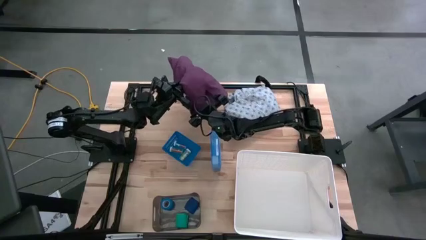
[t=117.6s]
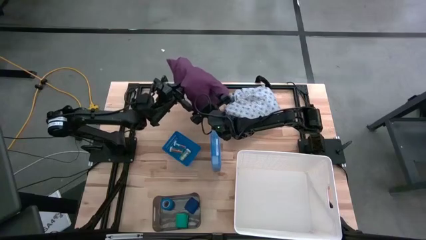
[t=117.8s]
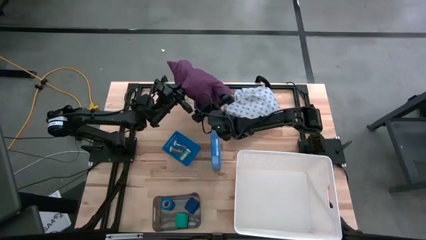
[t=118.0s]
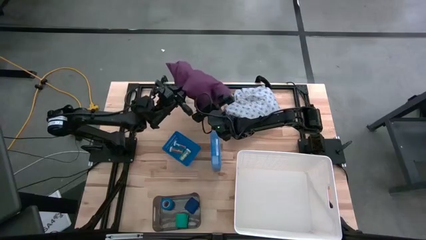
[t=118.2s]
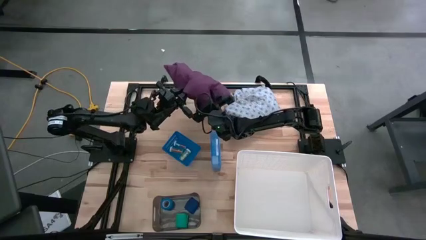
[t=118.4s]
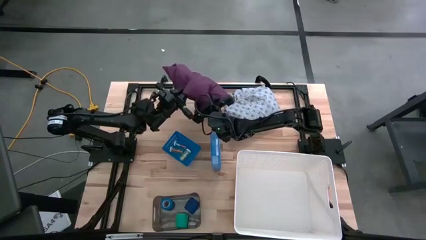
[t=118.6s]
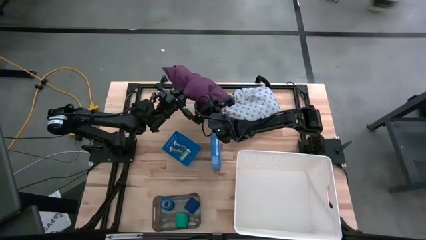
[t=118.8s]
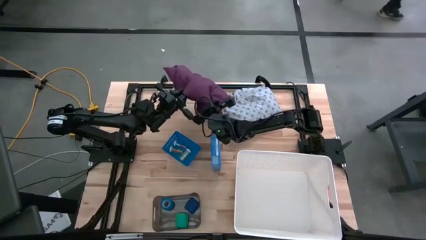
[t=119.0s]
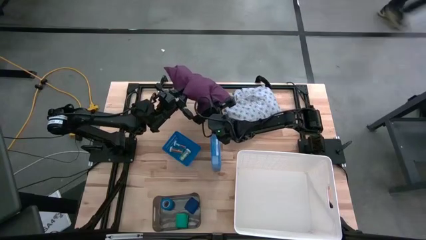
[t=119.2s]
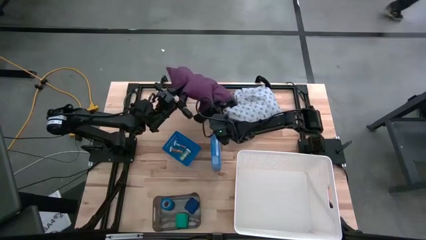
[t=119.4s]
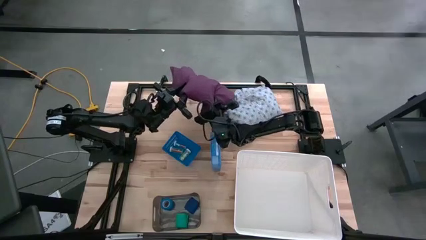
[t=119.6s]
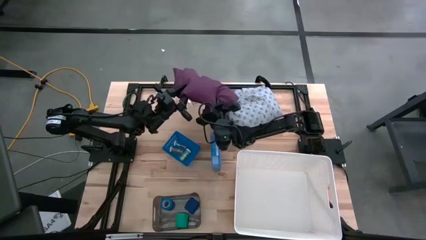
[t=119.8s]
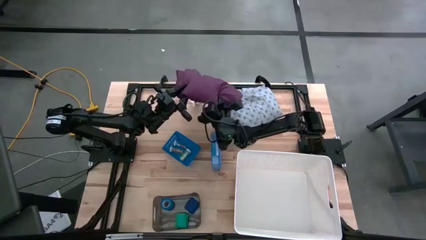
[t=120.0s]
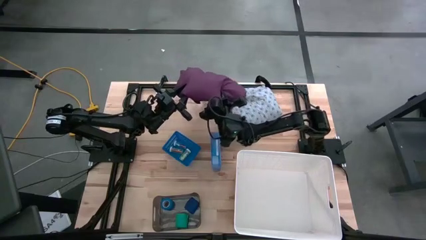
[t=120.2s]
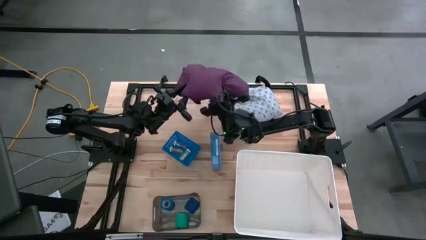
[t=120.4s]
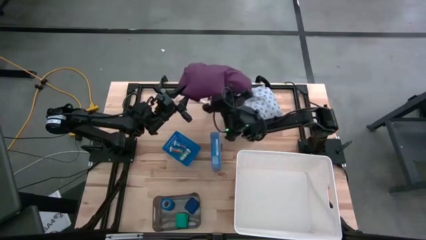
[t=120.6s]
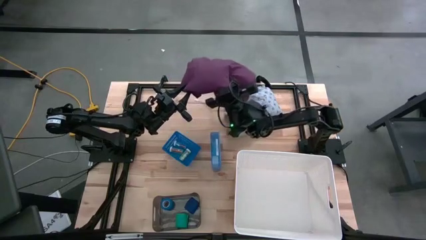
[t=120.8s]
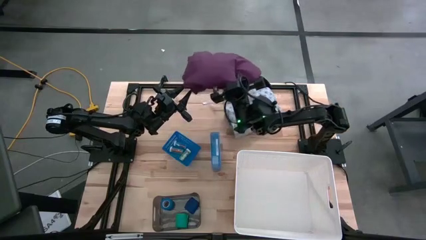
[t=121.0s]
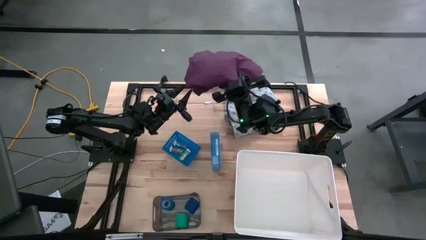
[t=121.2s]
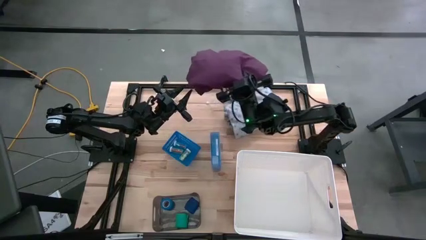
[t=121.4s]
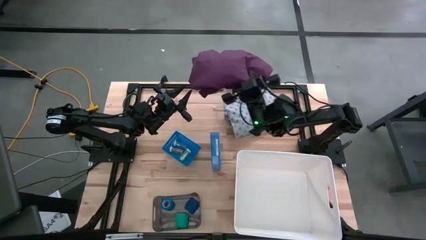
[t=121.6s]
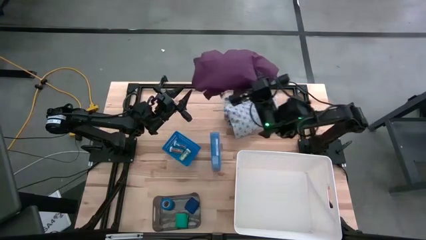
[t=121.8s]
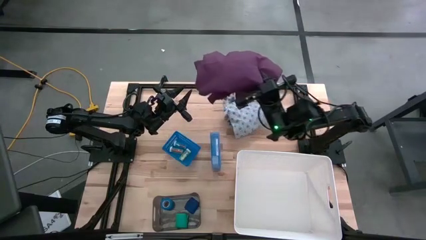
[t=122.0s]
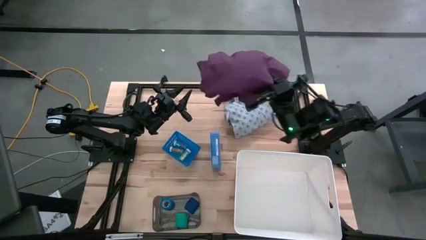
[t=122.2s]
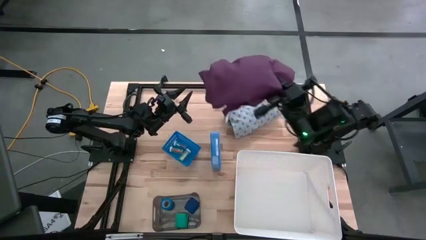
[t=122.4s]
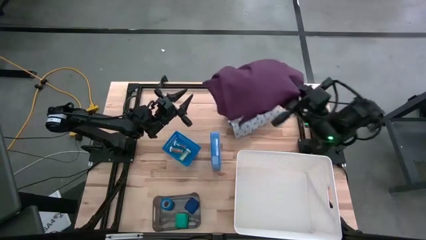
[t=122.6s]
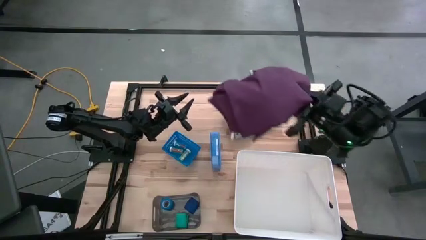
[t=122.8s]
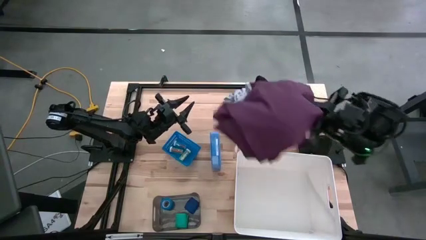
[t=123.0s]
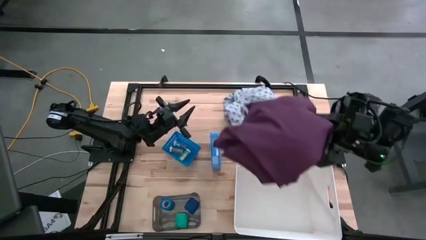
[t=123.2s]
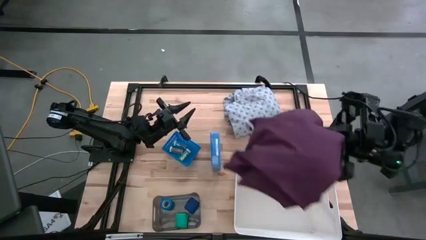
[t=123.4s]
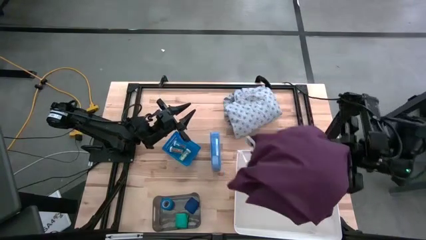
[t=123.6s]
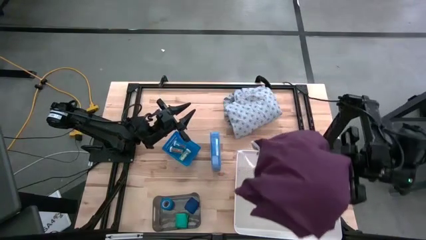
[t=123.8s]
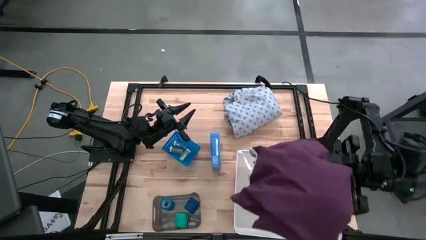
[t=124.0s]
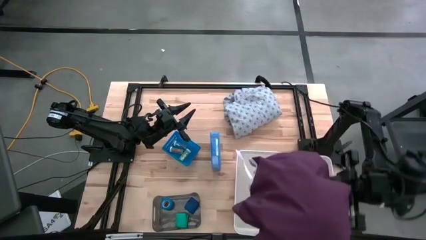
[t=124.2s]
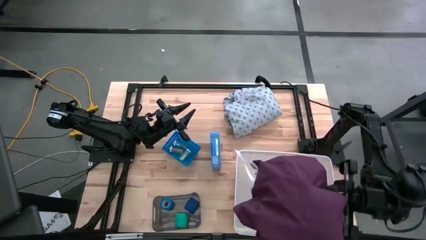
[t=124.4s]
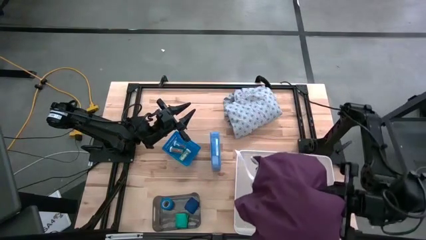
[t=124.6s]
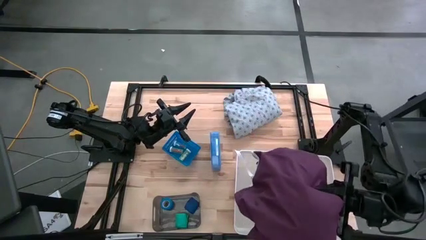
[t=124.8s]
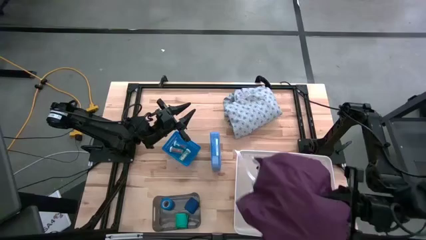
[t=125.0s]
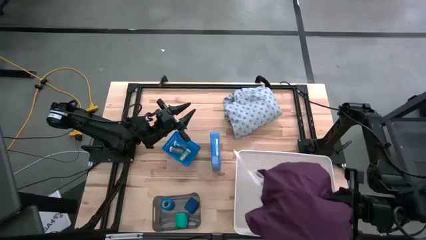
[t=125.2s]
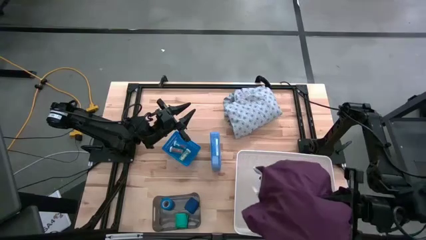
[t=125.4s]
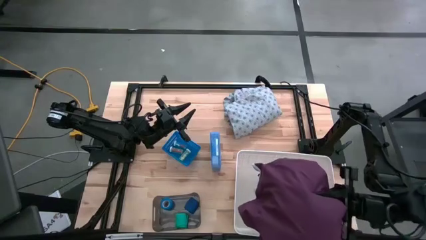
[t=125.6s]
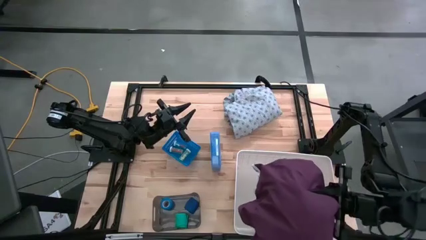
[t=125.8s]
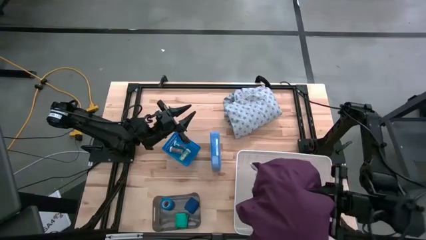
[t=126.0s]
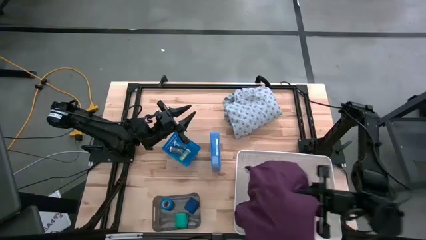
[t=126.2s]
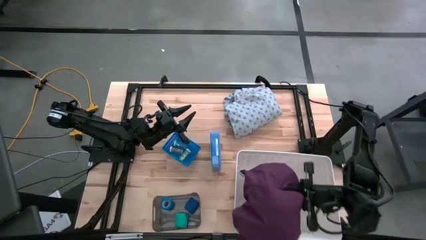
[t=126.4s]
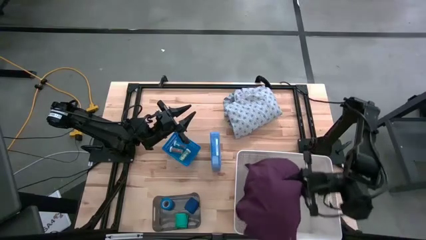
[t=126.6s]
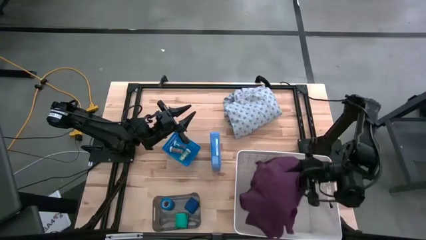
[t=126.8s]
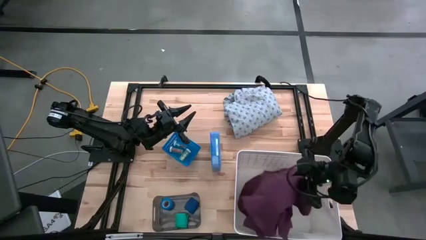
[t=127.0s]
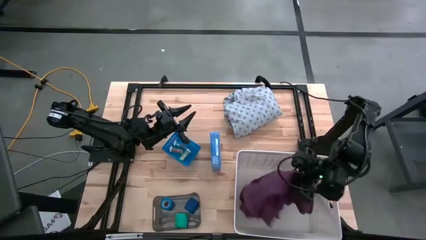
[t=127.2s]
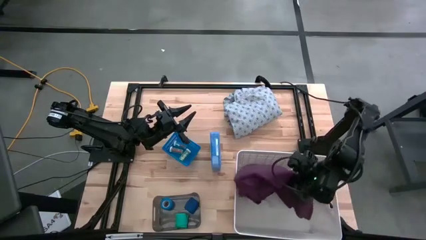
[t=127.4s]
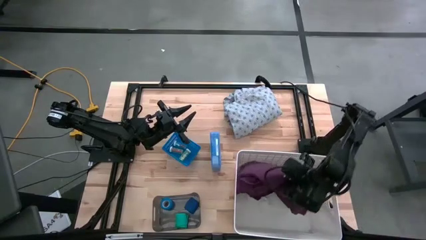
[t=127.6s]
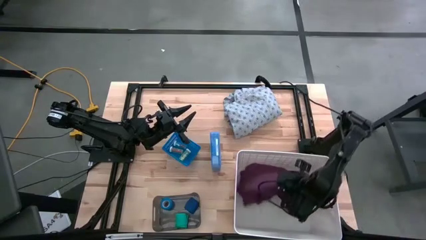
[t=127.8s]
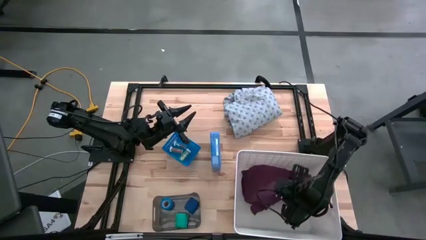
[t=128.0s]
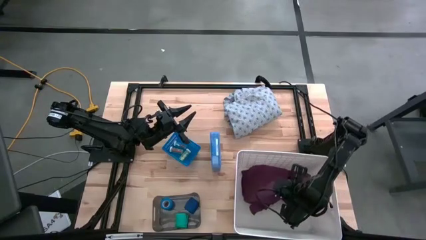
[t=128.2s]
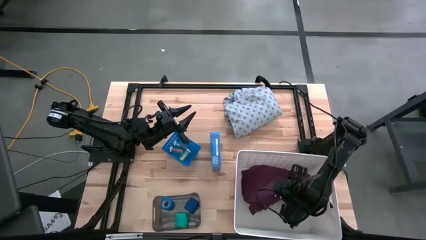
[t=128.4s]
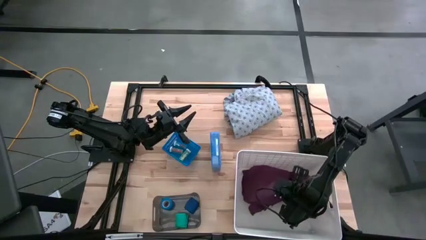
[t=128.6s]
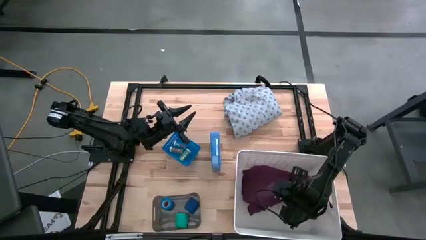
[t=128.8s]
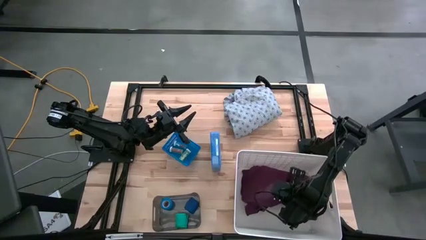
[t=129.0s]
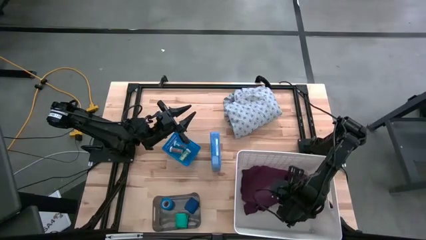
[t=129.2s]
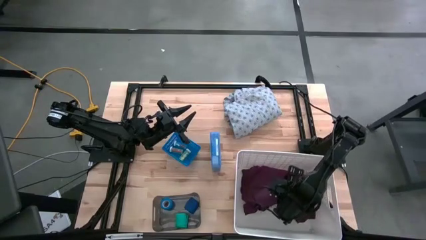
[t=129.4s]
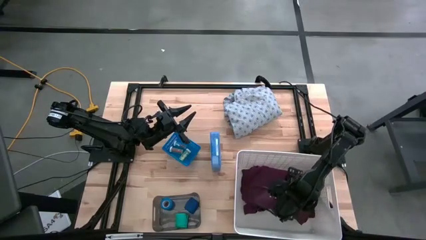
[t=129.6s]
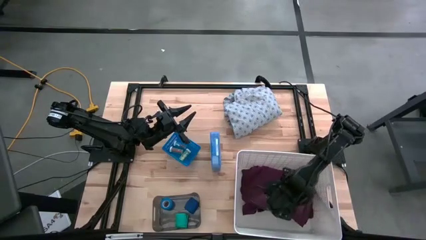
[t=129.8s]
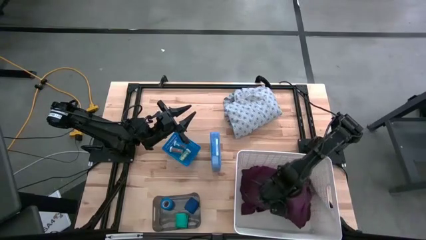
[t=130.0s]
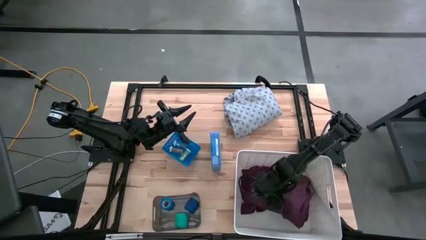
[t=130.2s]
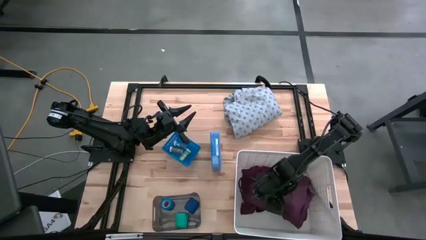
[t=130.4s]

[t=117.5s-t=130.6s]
Task: Pick & Place Medicine items
Put the purple scrubs into the white bin
